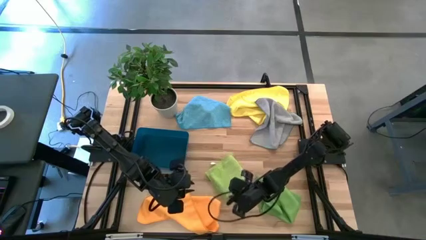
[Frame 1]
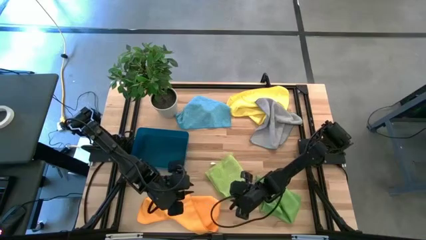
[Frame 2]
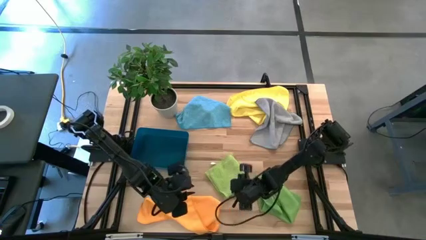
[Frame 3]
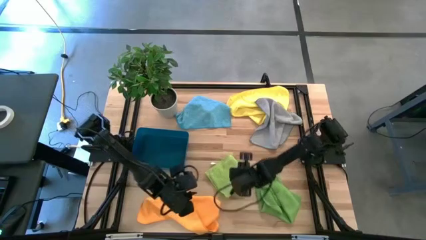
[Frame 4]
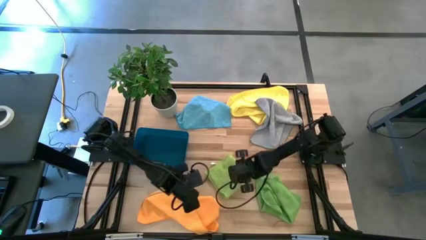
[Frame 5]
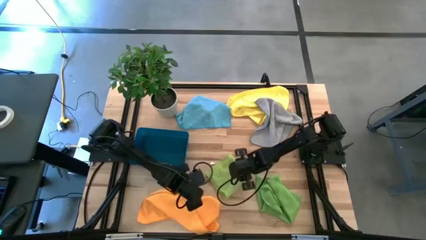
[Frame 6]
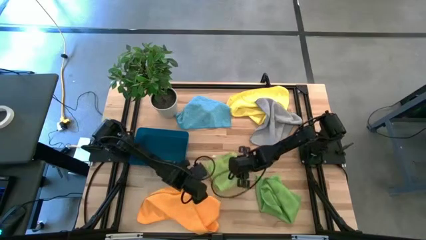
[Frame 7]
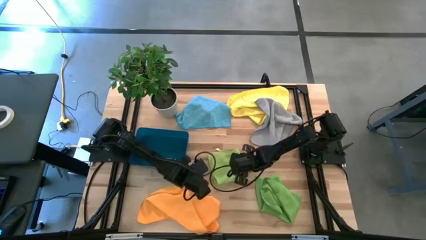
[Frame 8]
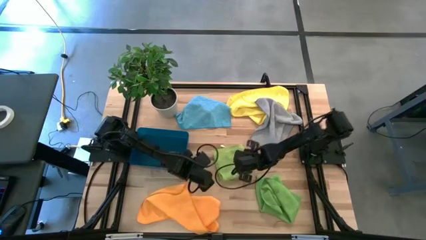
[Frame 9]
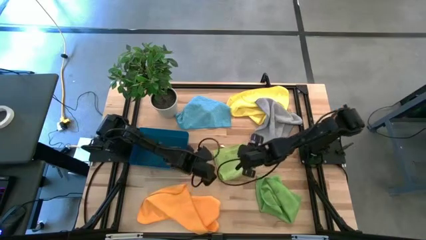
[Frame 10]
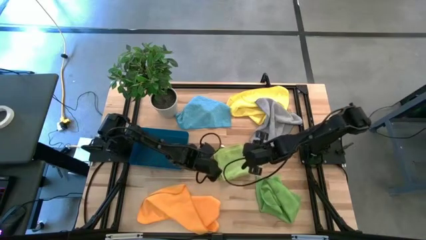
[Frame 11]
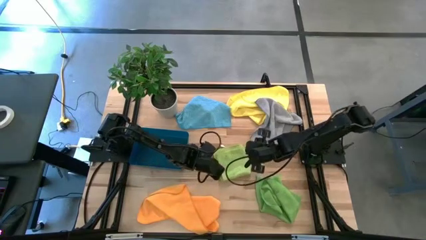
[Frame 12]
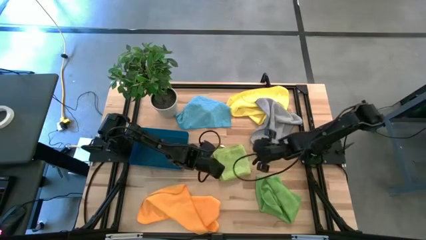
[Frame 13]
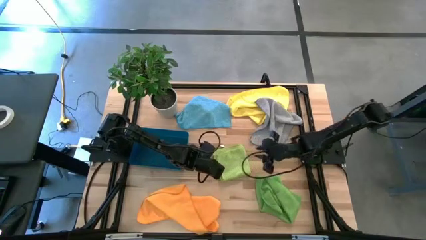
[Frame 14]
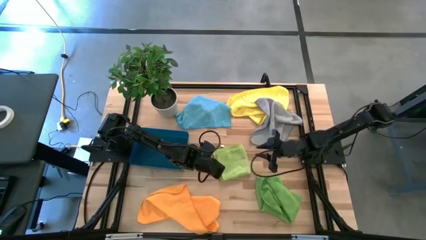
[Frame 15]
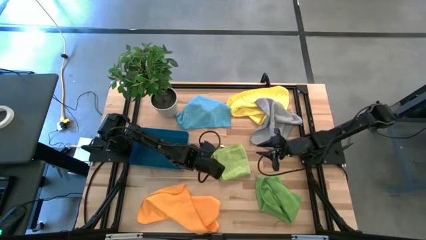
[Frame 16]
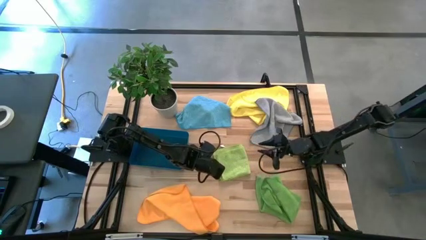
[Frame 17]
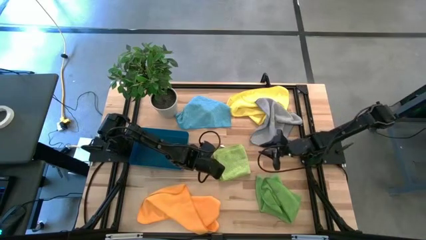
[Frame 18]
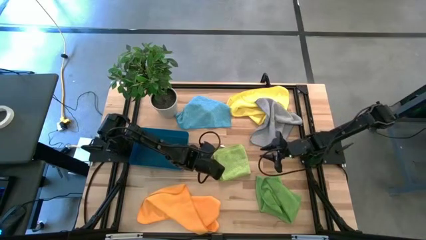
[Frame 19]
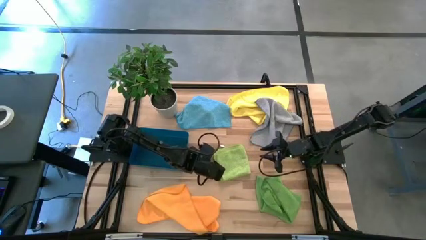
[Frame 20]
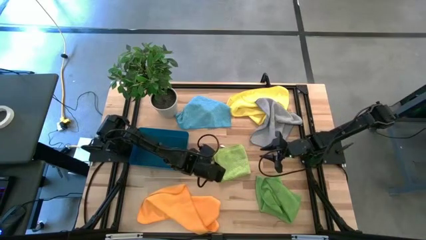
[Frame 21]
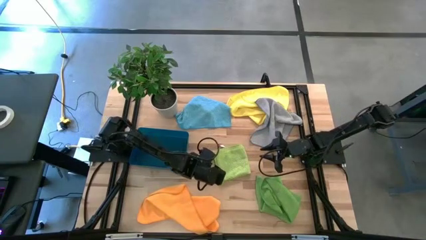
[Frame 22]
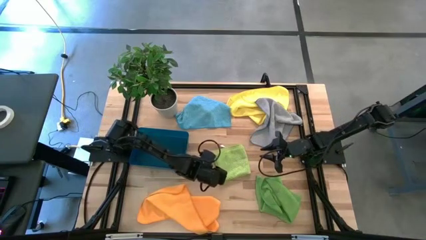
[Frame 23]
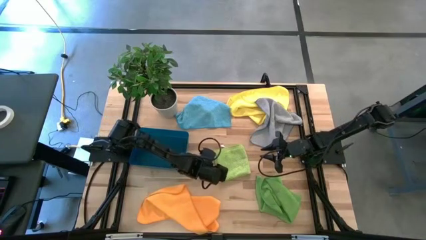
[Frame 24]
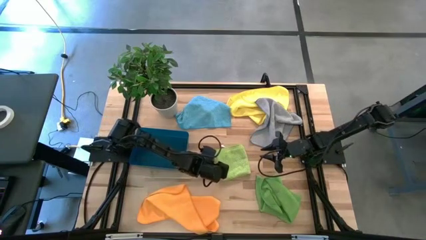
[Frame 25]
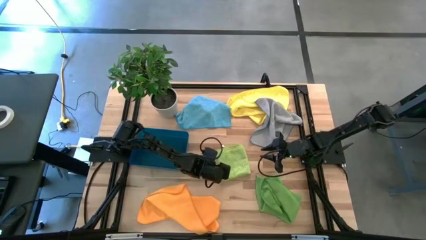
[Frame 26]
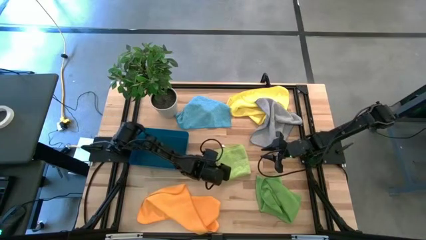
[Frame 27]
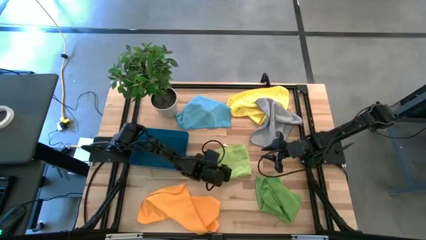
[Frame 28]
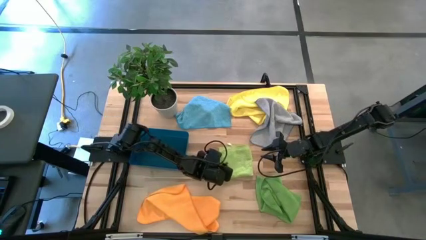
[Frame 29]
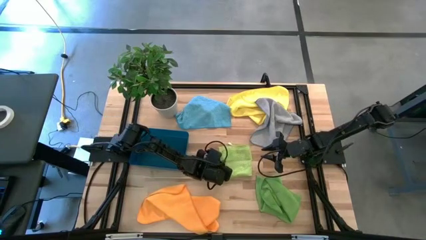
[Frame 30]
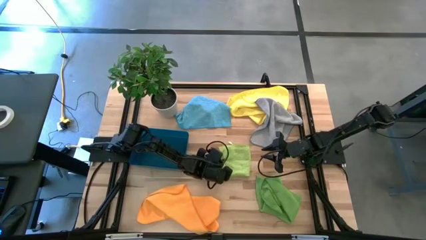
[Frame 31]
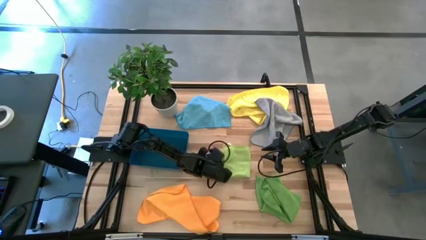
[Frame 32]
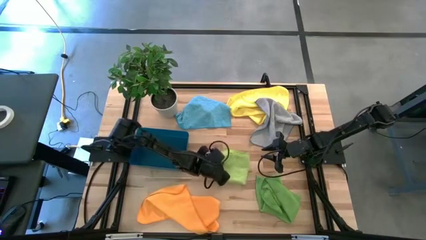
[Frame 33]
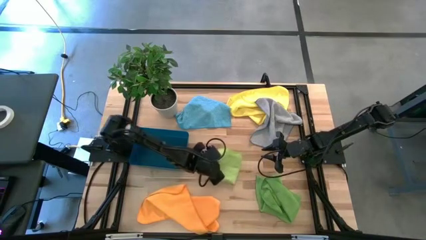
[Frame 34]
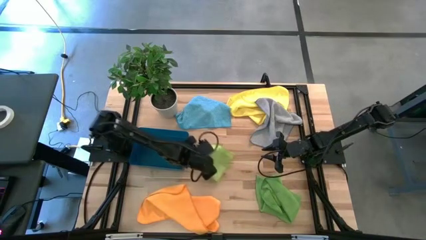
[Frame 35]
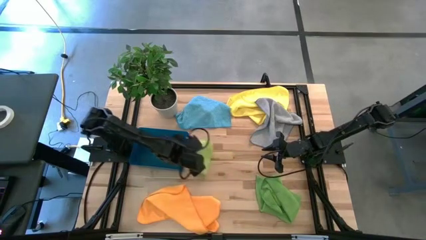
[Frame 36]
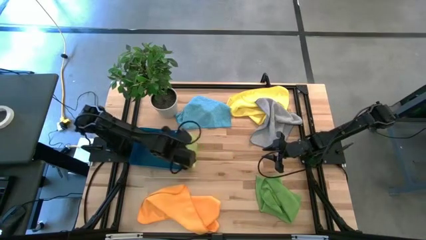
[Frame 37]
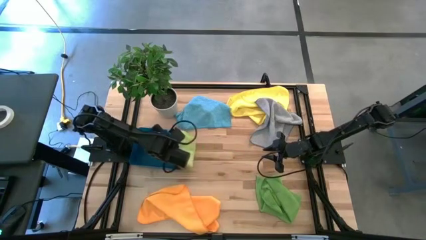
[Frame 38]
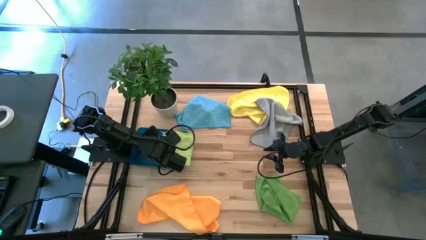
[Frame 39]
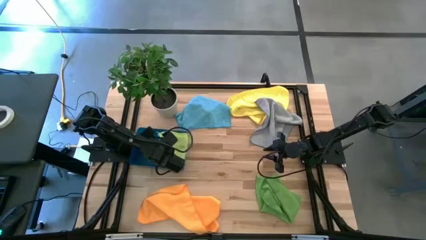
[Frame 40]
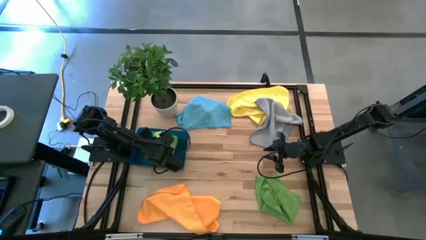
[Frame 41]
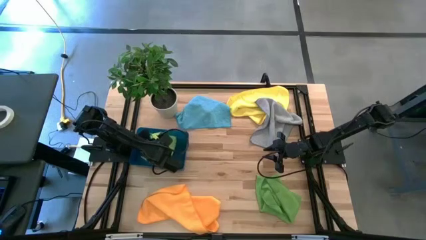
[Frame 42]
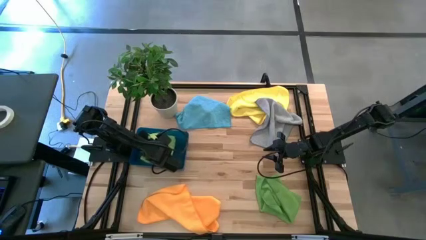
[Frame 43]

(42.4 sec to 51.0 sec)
Task: Fold microfiber towels
Put the light green microfiber towel into the blue bin

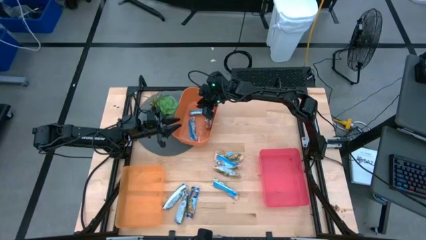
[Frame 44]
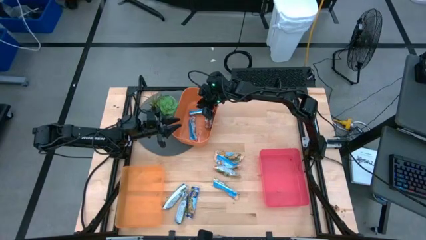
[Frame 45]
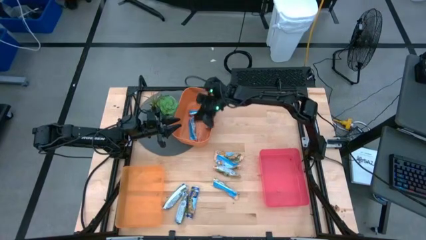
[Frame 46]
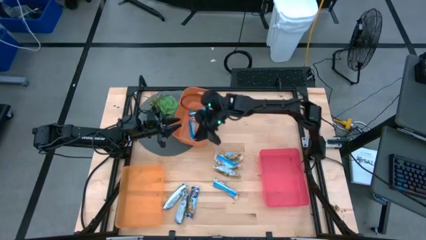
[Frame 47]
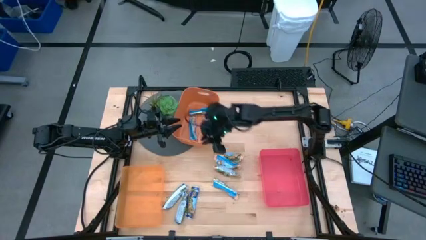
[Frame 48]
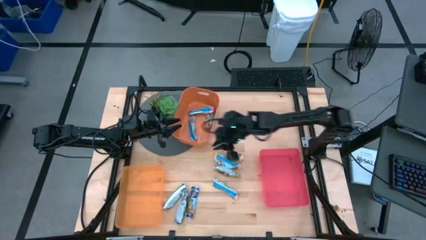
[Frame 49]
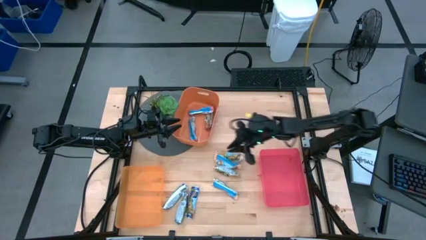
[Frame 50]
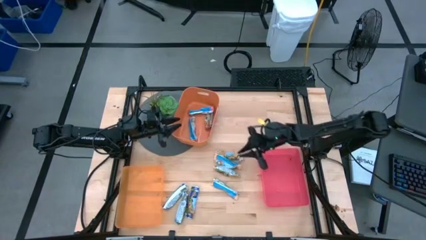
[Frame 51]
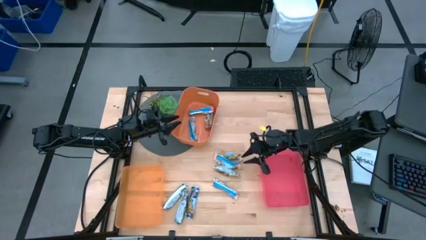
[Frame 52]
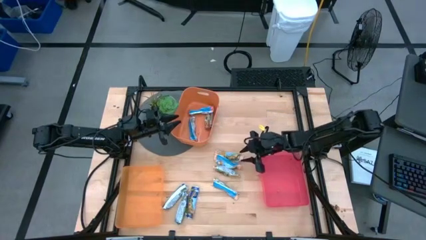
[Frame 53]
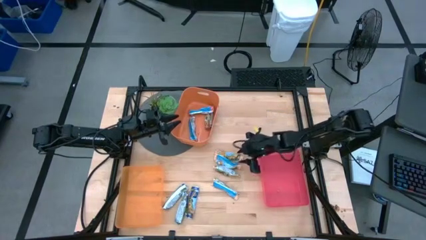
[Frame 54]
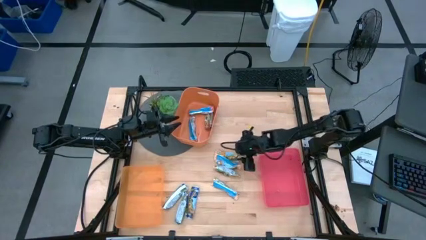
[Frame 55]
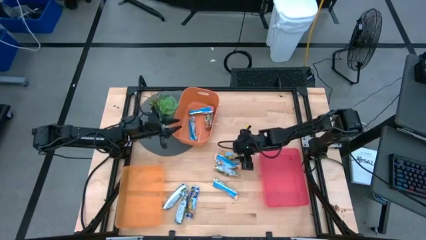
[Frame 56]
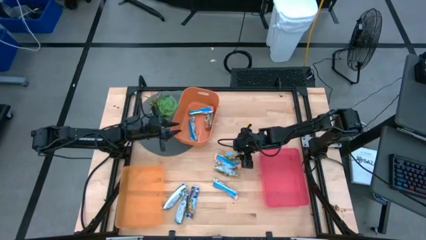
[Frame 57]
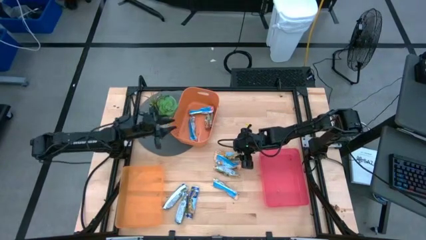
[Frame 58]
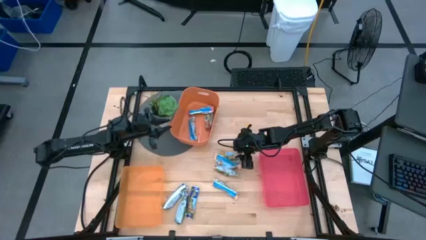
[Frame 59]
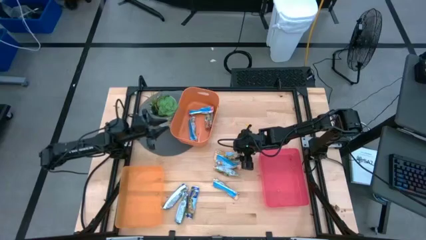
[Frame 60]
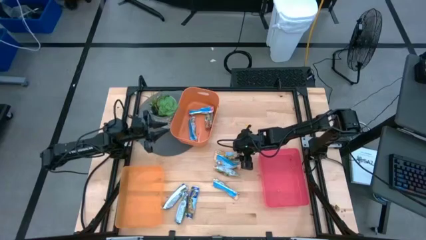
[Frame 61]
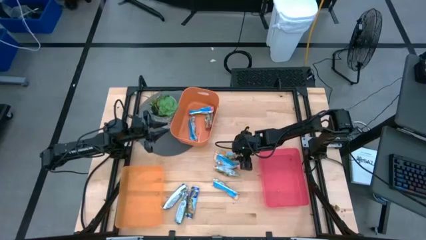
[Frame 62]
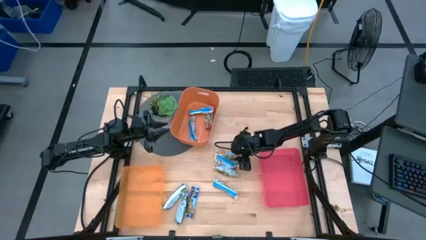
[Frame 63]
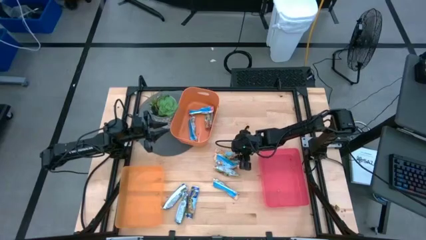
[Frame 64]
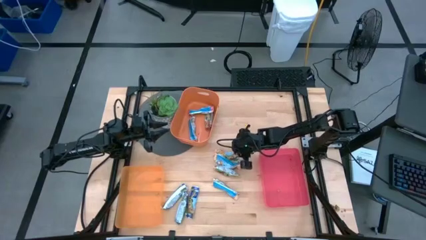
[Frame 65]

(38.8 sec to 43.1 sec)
Task: Pick and place Granola Bars by type
Put the yellow granola bar into the red bin
